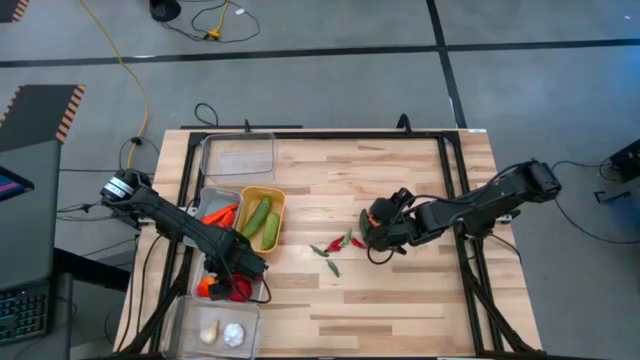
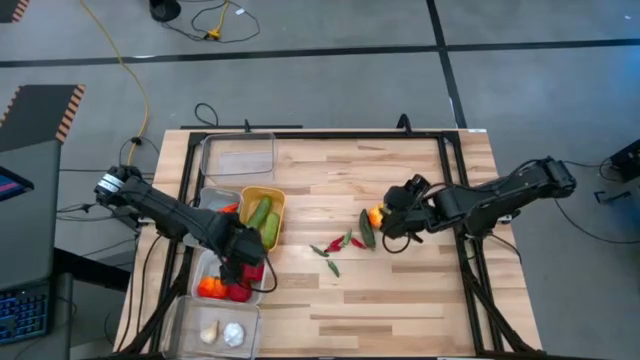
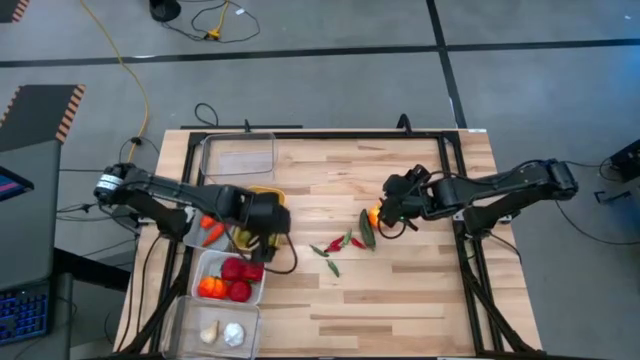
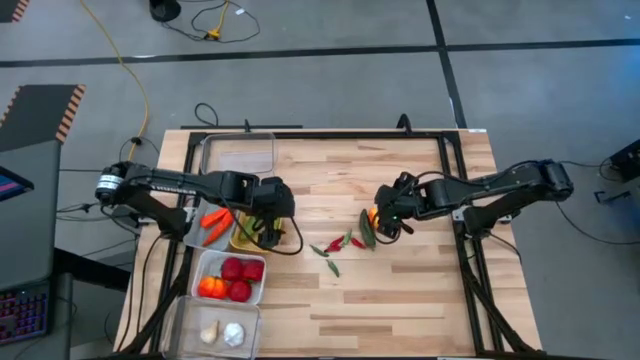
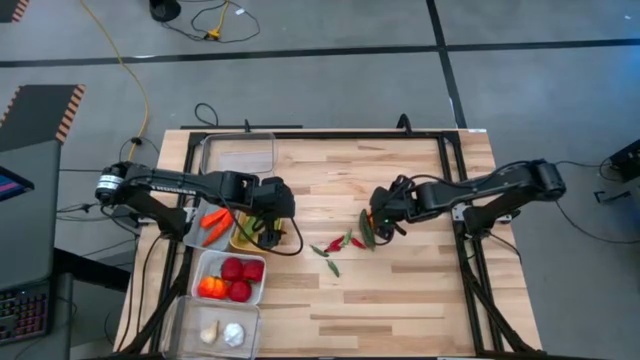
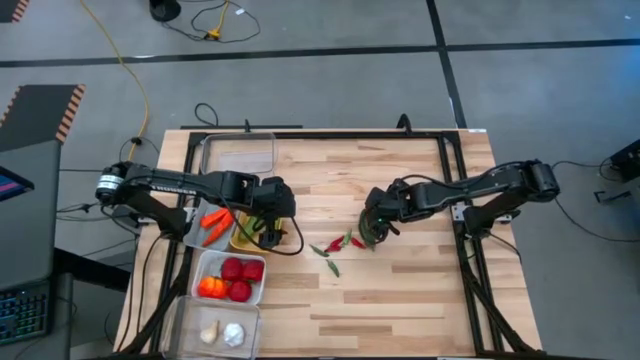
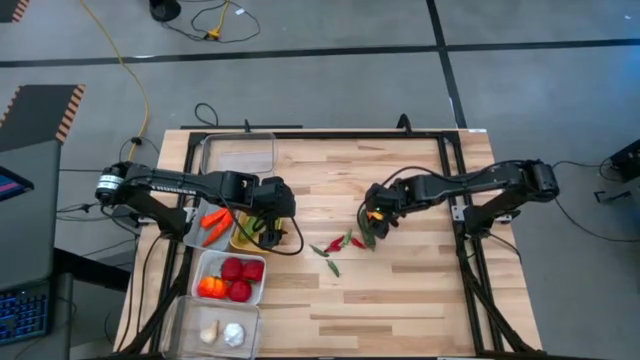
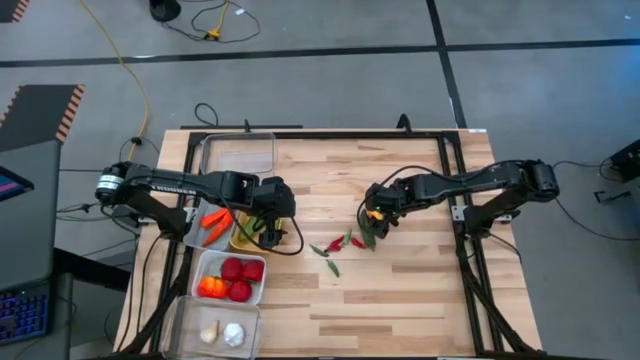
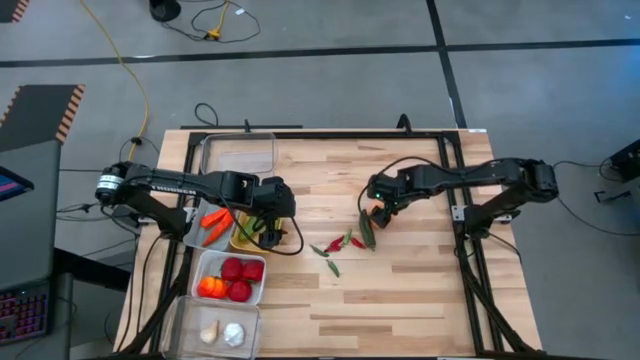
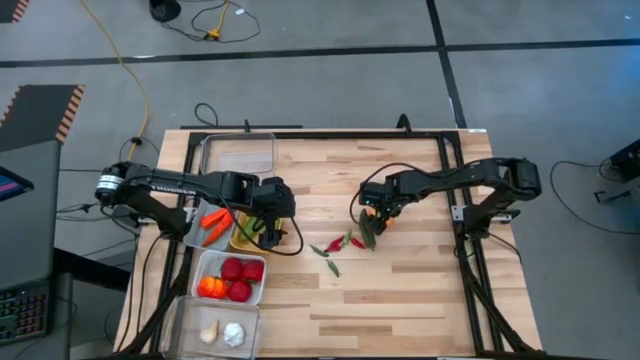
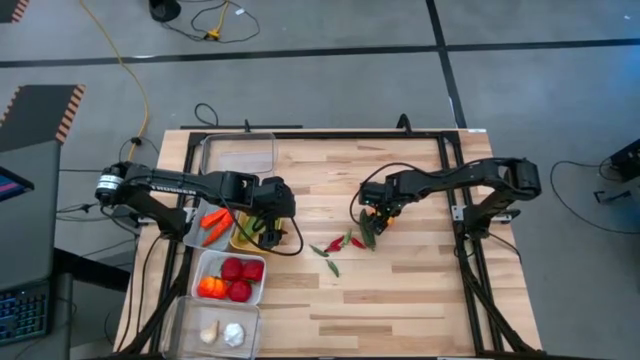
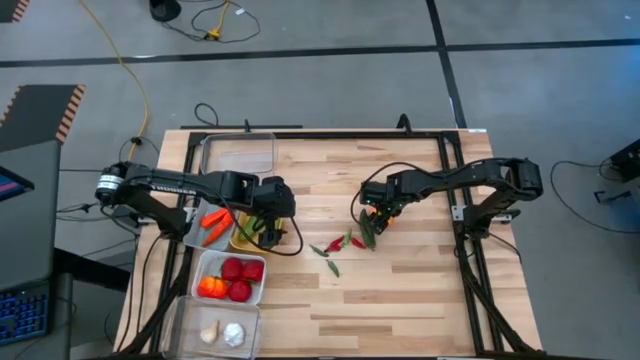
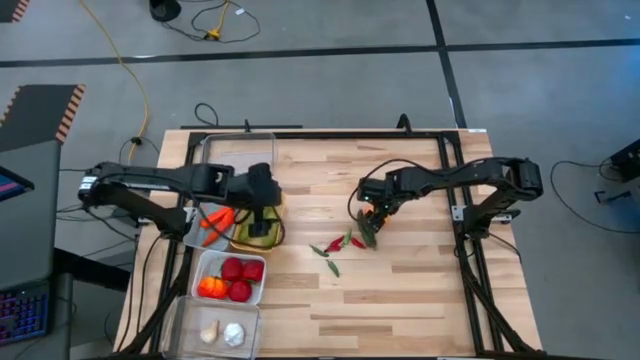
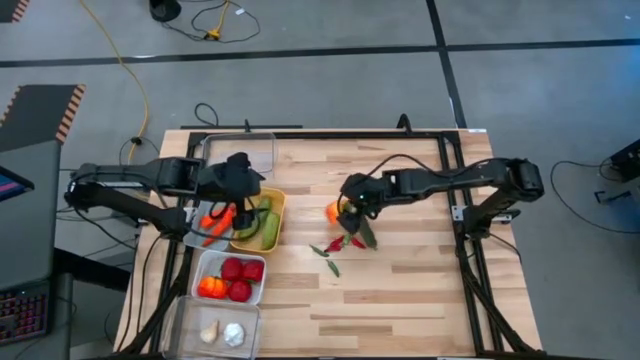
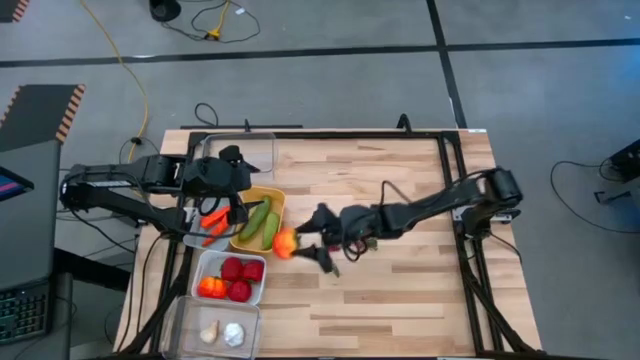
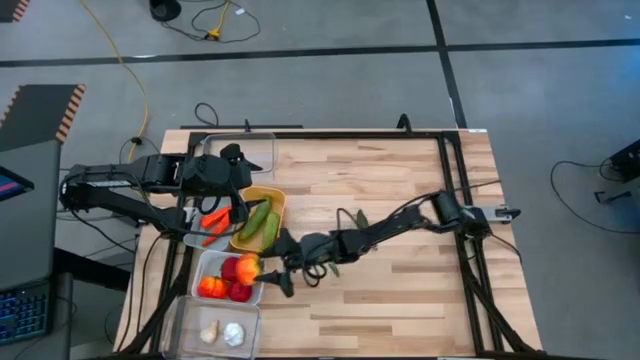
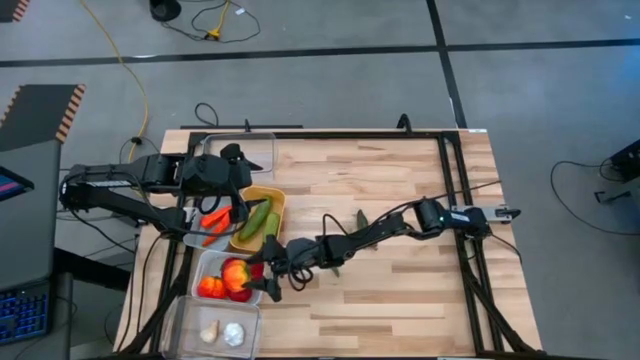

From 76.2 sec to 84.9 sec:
Task: Sort produce into baskets
Put the tomato into the white bin

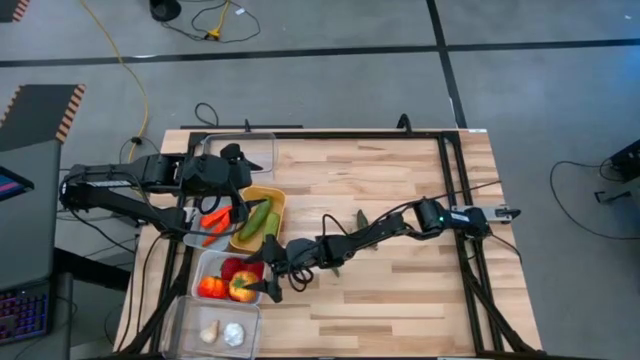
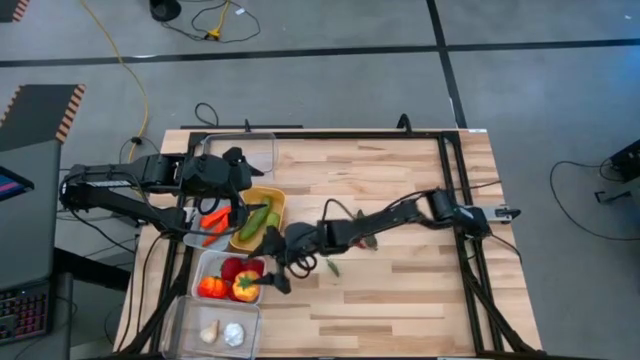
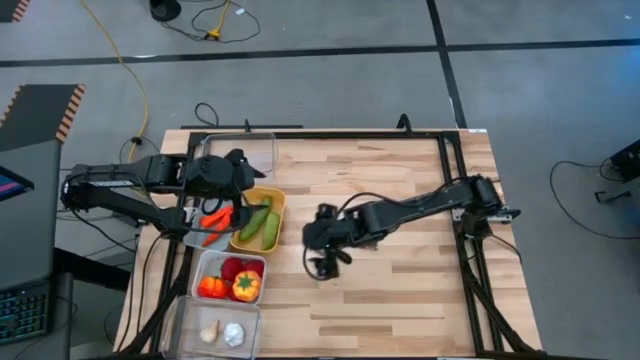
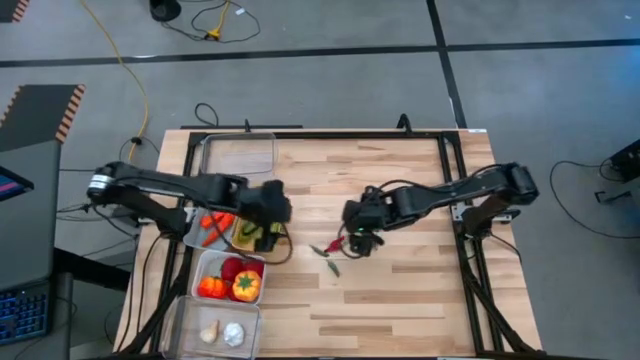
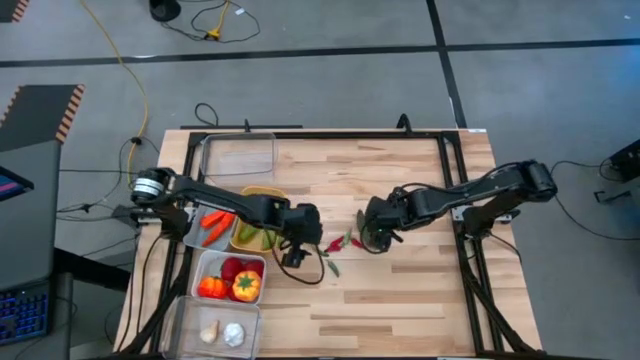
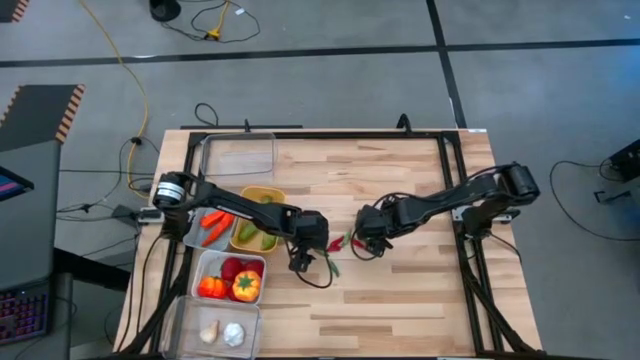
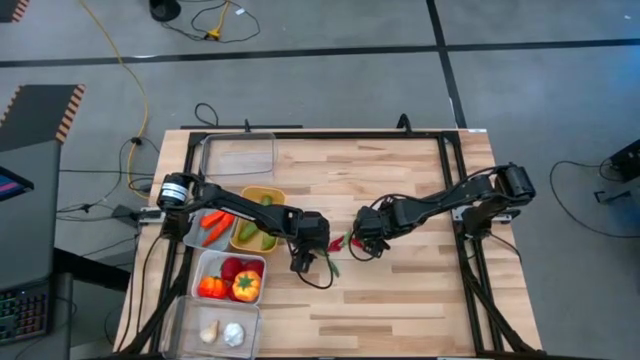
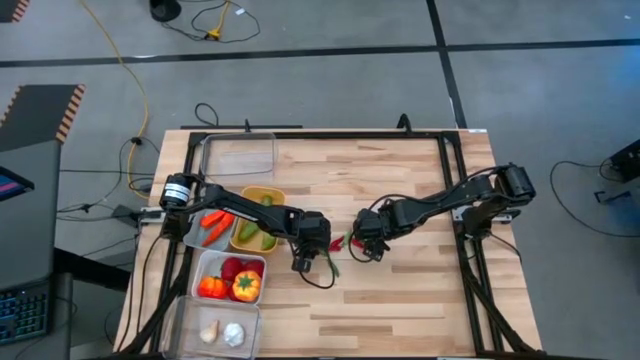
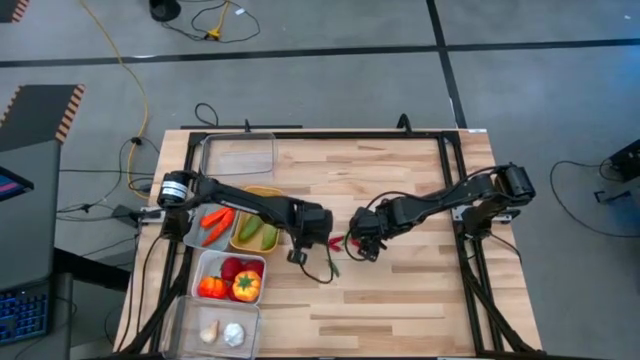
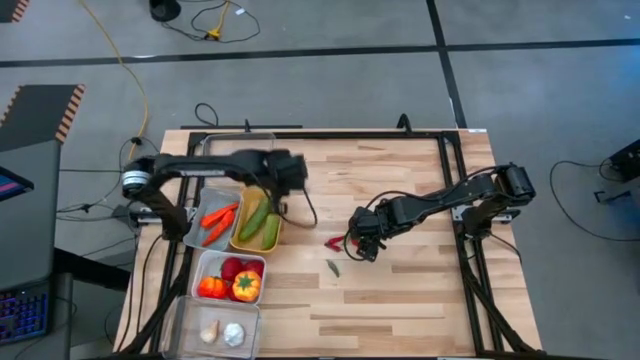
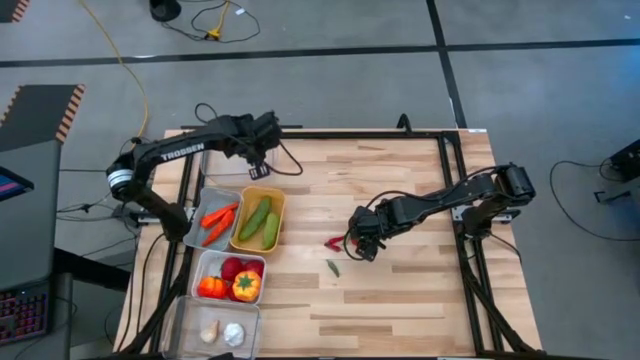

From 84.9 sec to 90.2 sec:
Put the middle left pepper into the top transparent bin

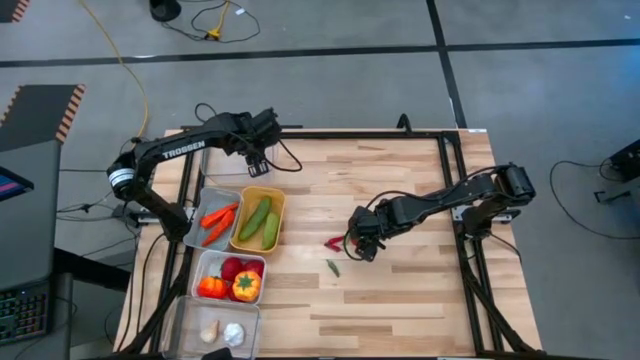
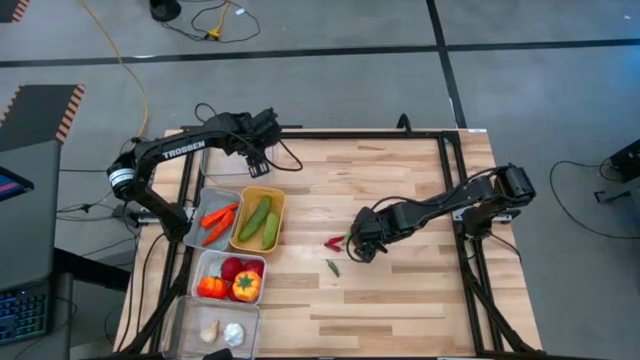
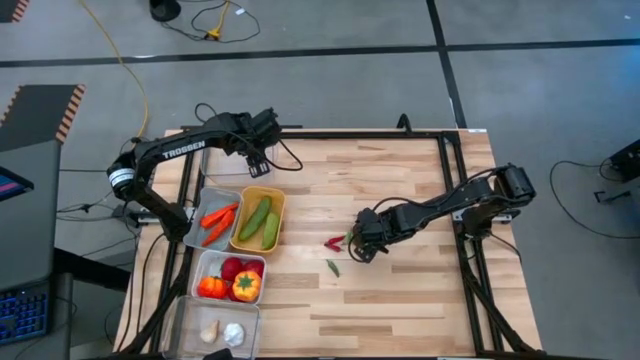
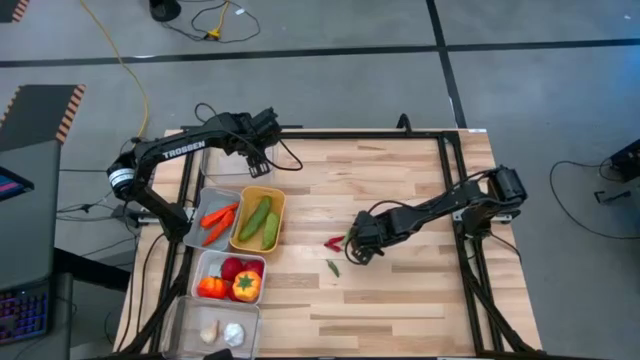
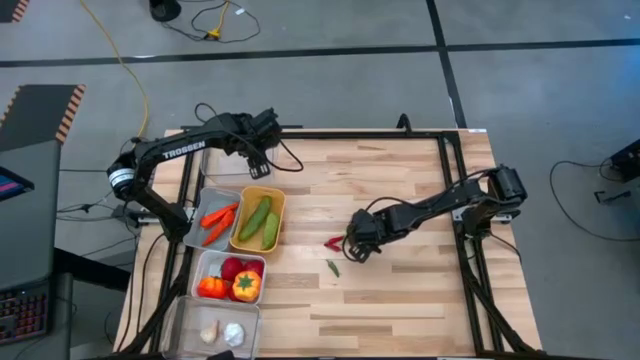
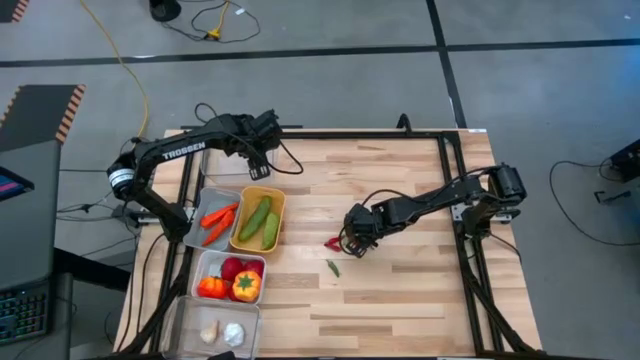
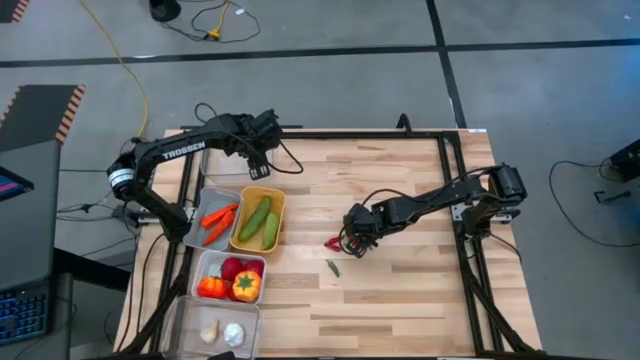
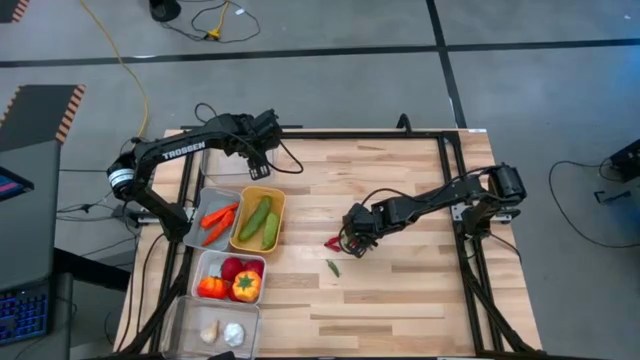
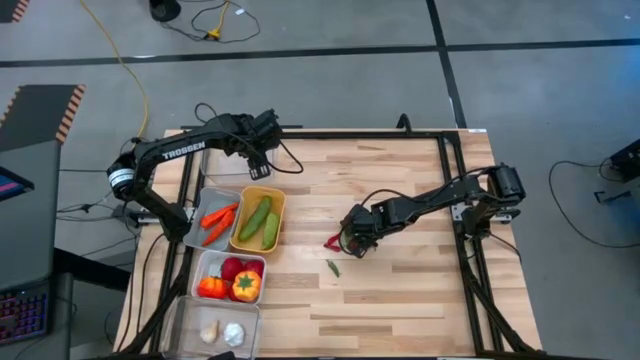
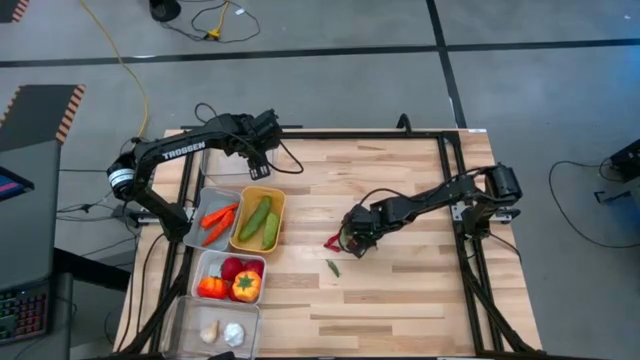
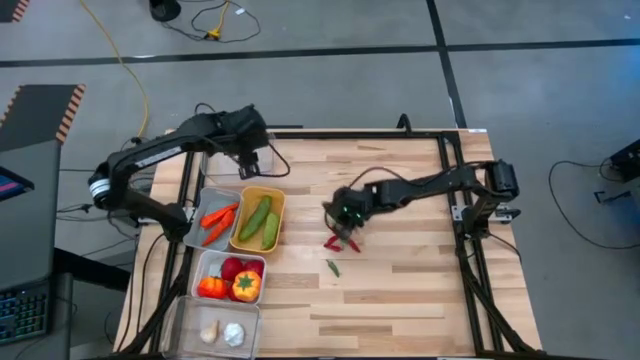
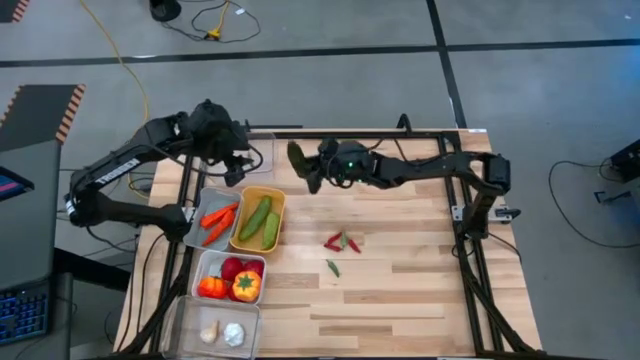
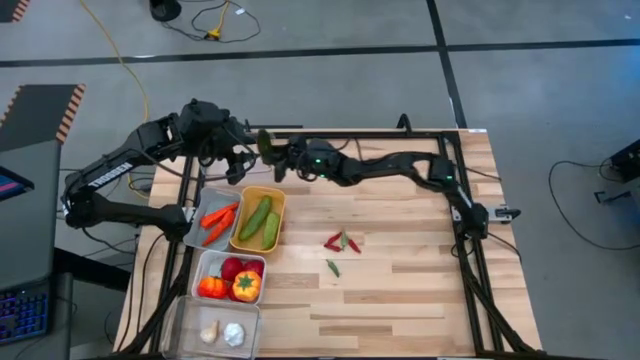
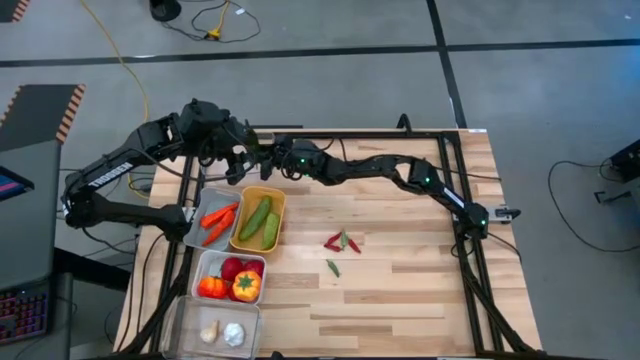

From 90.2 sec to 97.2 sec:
Put the middle right pepper into the top transparent bin
